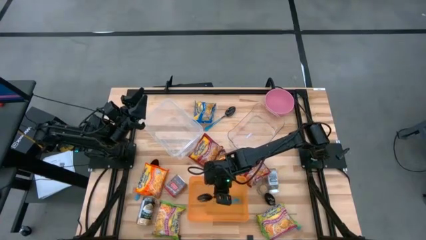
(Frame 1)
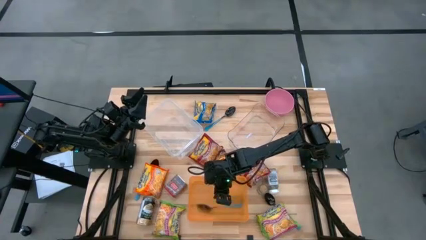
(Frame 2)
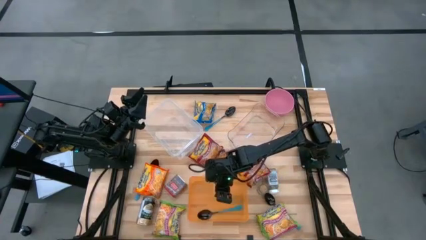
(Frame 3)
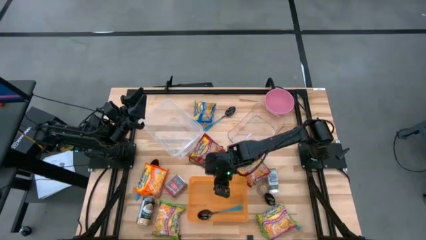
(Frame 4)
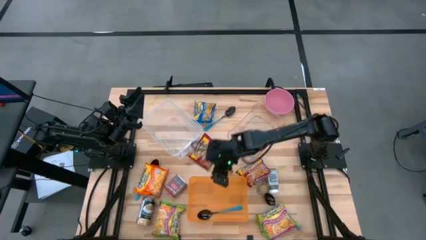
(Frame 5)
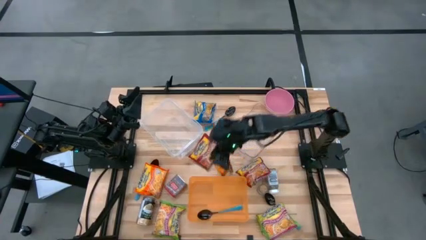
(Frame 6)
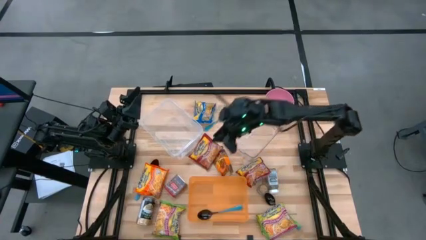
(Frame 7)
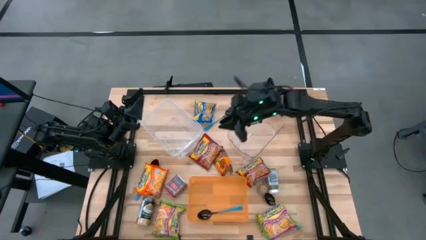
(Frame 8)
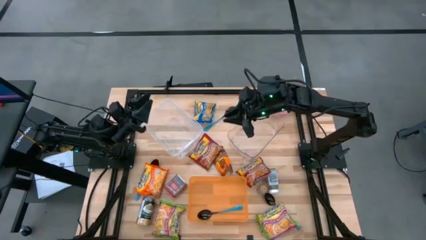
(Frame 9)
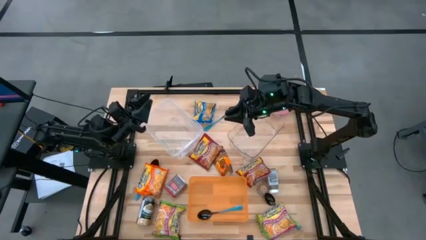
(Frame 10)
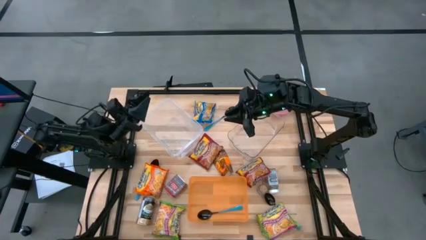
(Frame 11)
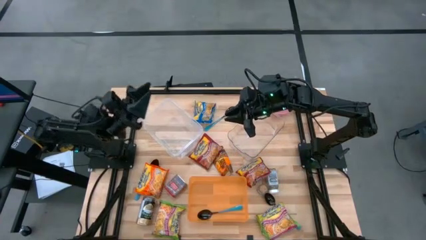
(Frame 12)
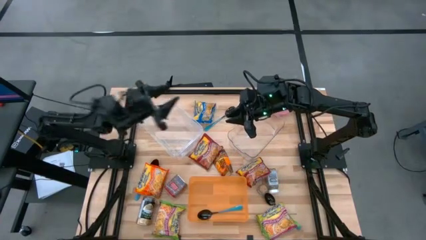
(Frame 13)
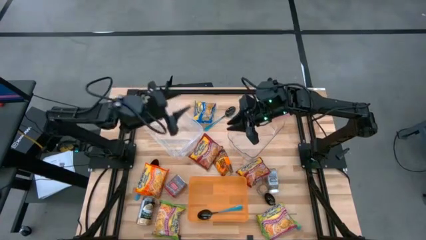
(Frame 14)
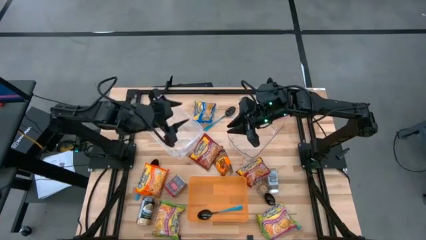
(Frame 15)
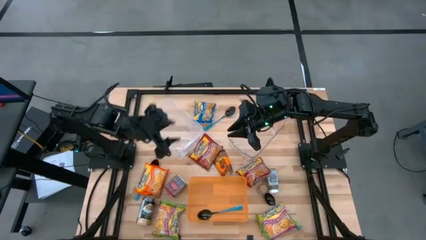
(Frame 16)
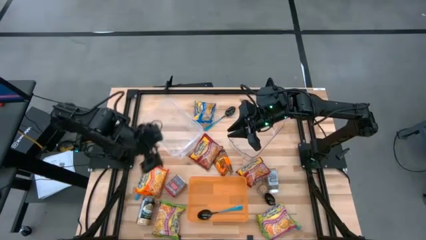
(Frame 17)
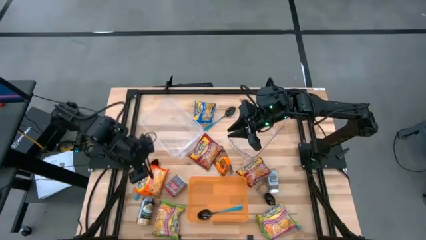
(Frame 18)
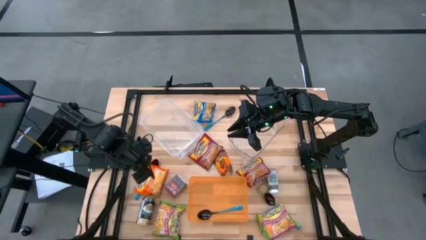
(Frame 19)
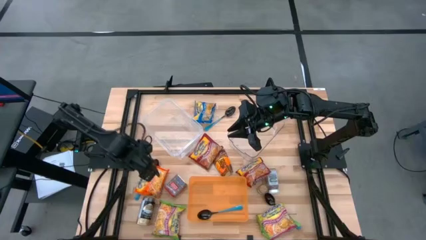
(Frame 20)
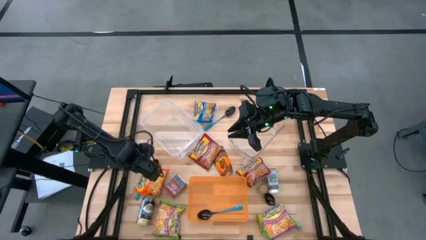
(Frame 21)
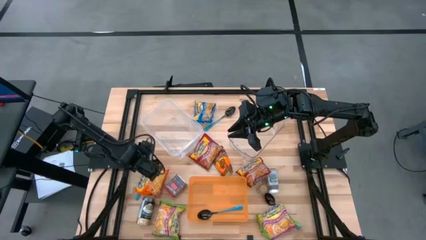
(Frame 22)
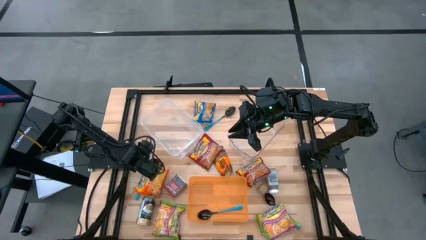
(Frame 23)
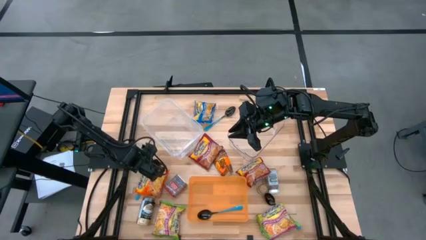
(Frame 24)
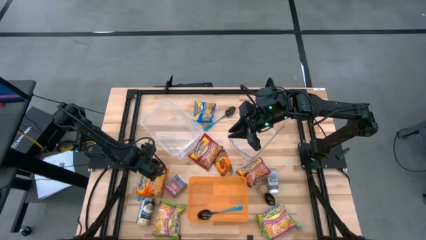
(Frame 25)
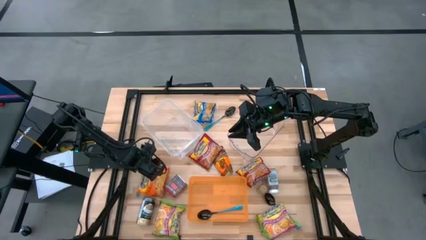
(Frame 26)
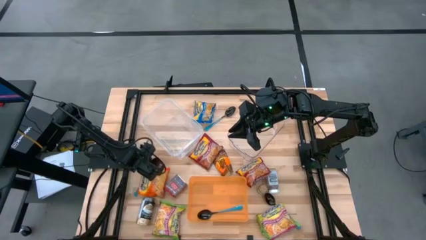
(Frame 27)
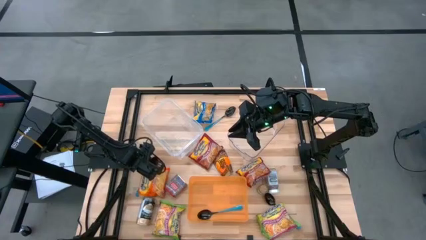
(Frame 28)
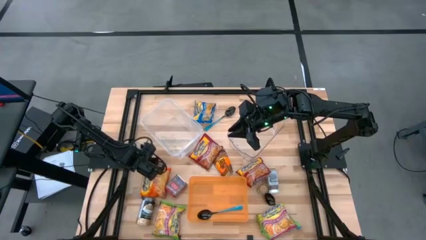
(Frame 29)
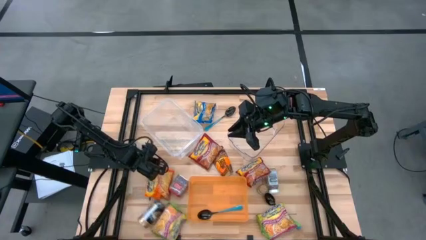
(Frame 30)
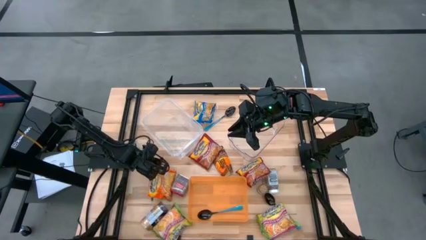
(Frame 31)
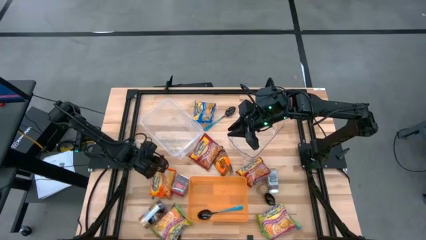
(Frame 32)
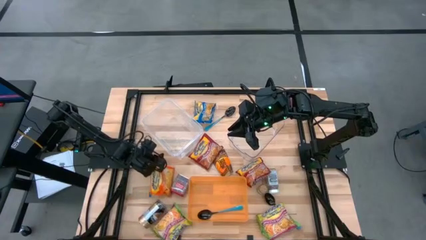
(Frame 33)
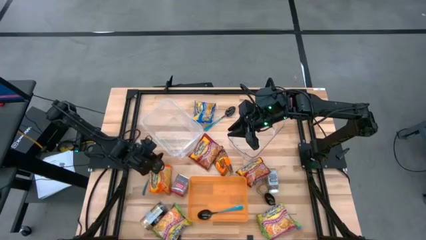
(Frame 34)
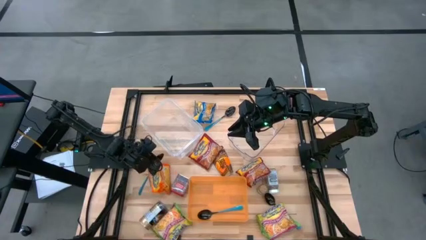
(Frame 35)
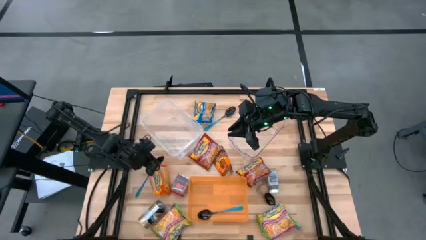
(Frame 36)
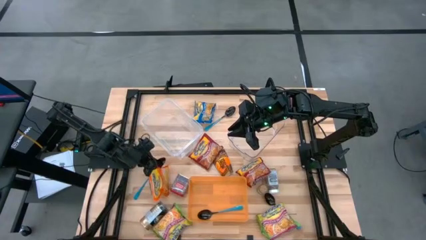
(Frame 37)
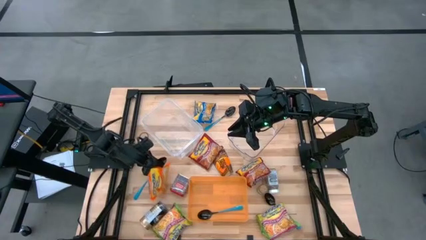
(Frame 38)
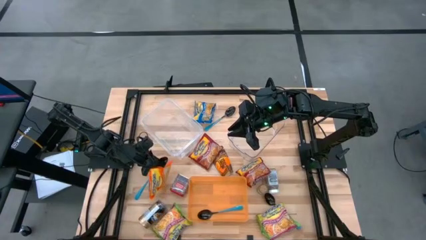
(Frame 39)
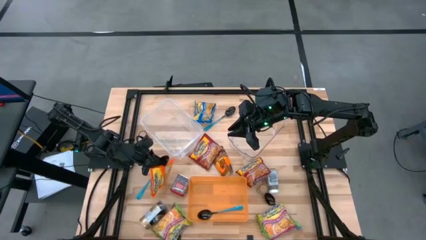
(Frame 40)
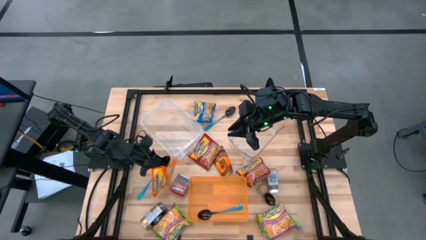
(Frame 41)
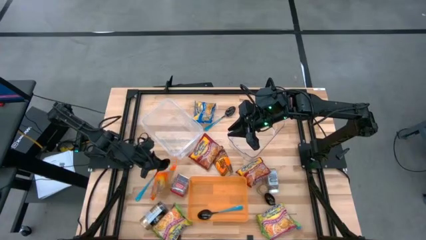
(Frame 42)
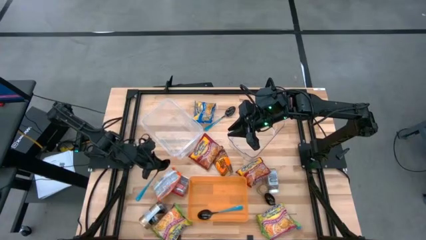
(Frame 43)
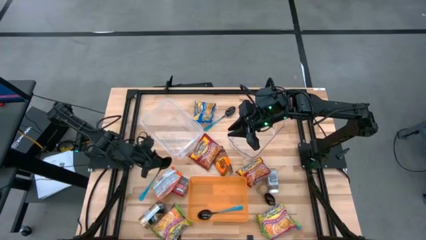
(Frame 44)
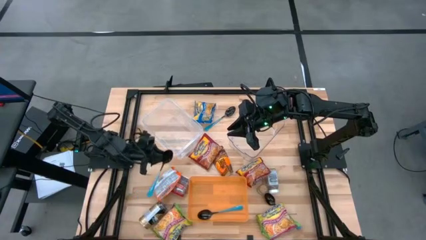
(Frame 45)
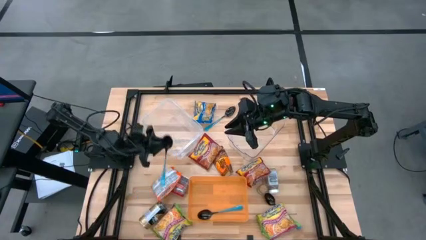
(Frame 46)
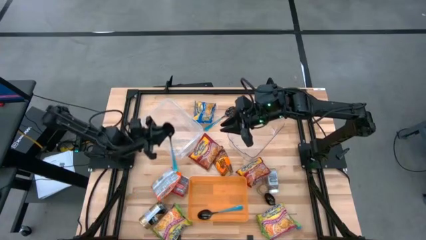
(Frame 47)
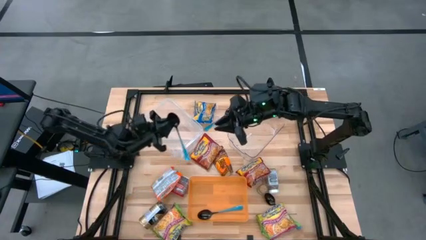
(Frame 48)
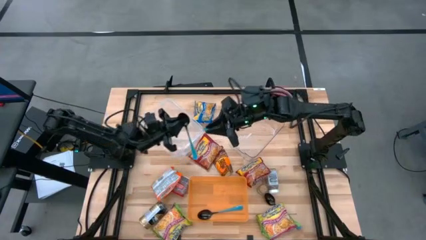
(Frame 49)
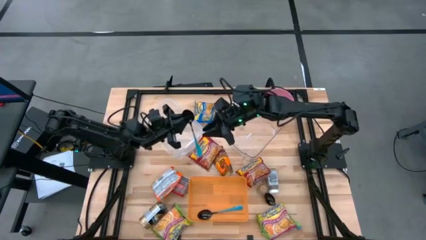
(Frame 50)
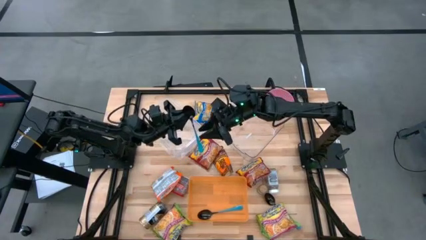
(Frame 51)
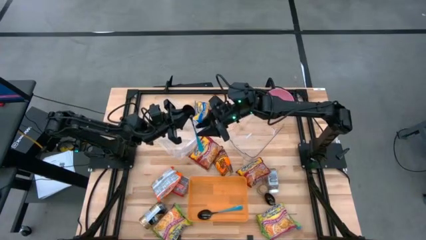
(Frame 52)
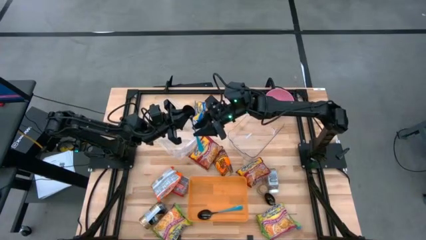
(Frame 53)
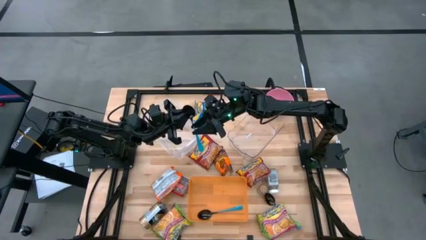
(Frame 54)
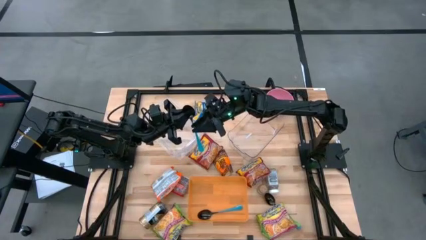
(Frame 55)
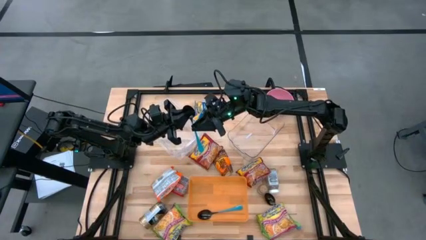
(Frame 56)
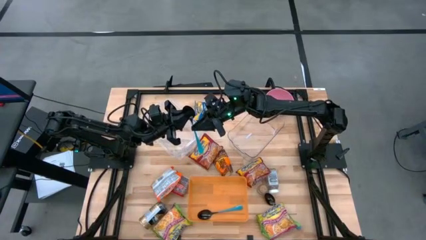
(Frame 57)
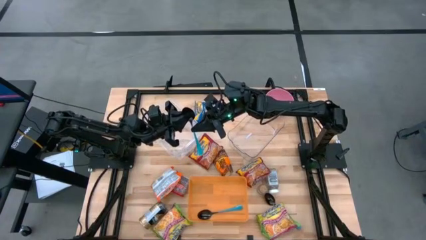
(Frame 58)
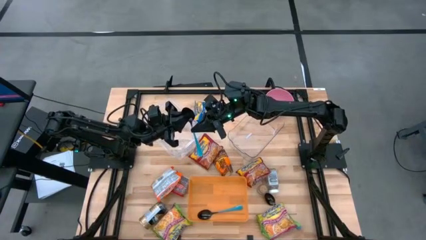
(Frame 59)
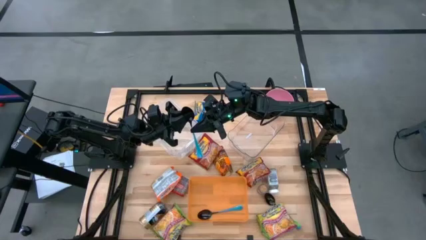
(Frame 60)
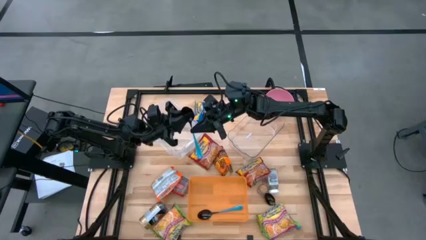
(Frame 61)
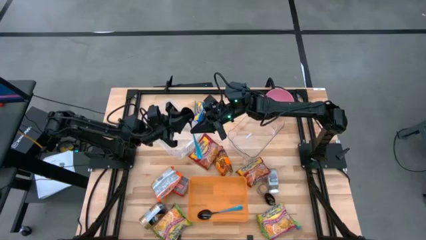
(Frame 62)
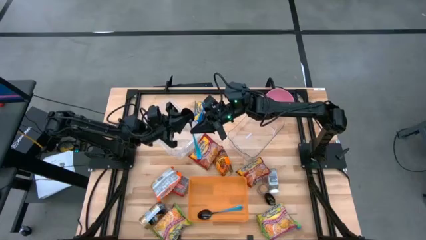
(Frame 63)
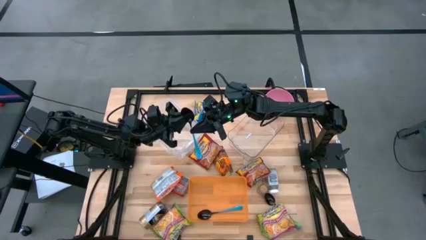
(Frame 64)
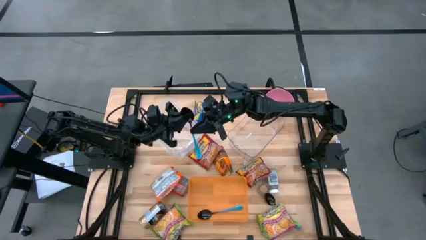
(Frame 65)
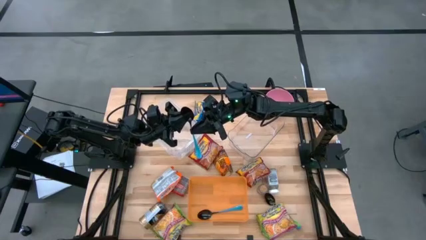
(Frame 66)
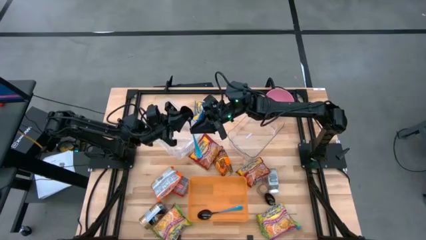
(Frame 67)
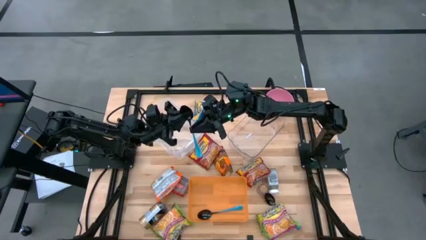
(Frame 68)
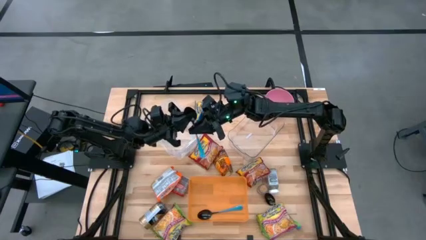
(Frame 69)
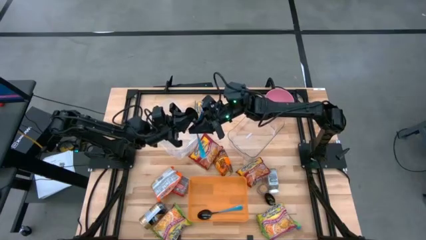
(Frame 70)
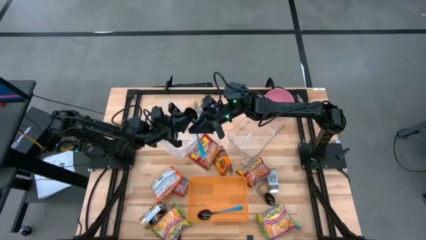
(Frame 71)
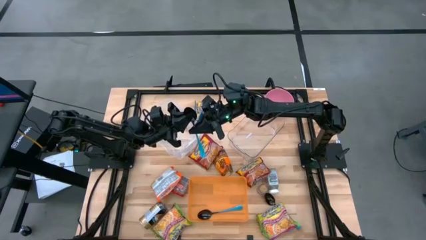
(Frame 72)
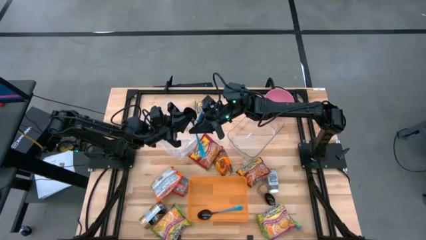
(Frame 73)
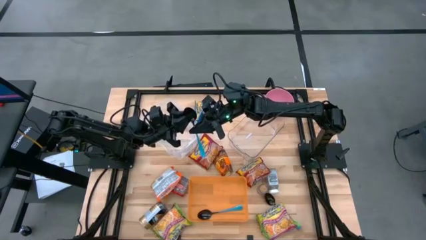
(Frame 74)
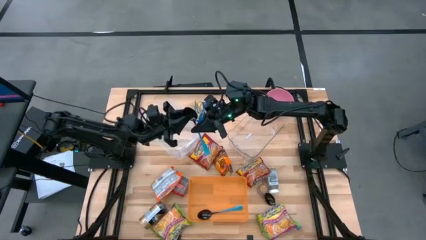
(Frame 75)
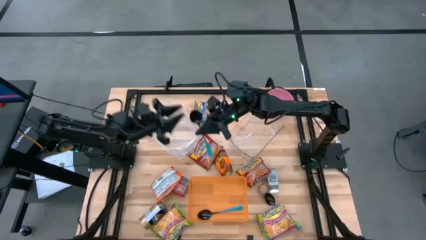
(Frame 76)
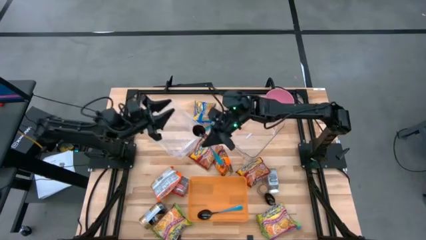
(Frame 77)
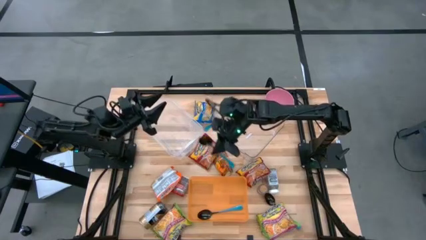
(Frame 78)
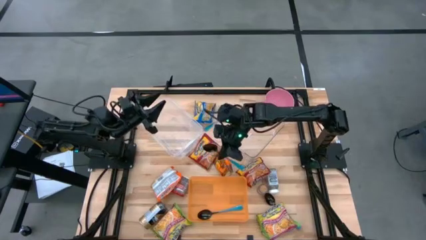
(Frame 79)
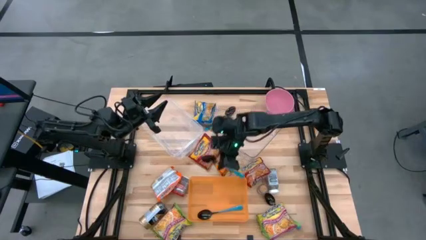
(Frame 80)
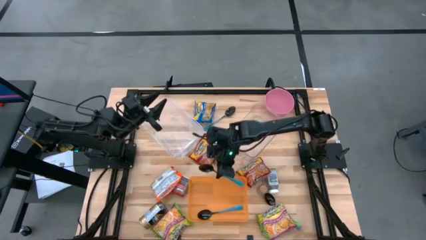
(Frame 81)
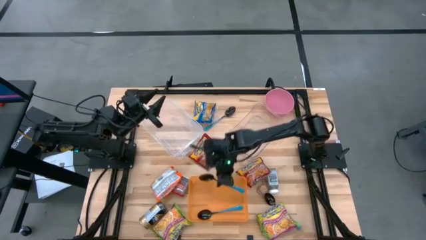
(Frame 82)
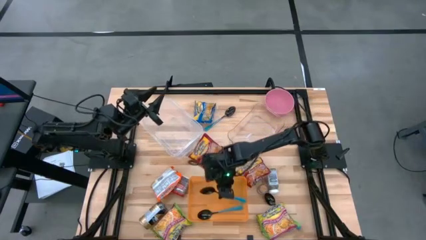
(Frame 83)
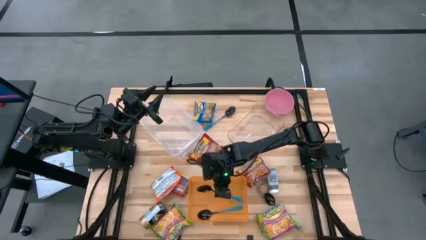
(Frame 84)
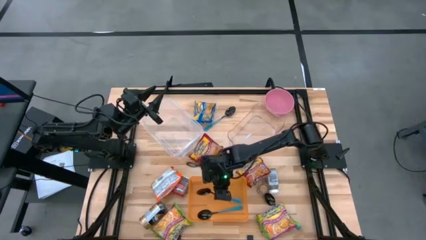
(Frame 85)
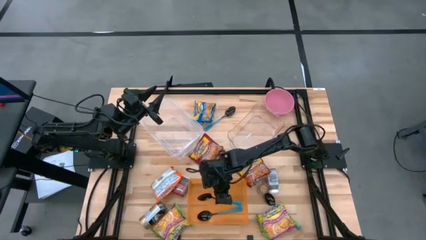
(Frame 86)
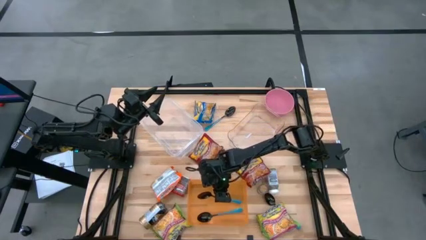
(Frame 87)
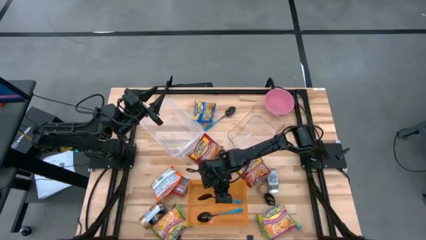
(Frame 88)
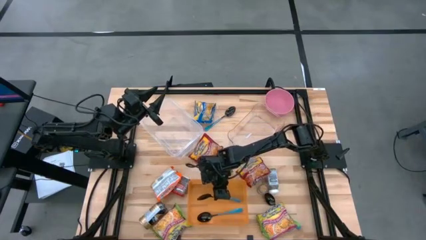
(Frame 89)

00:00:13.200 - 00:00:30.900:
Task: Pick & Place Food Item
Put the black spoon into the orange bin
